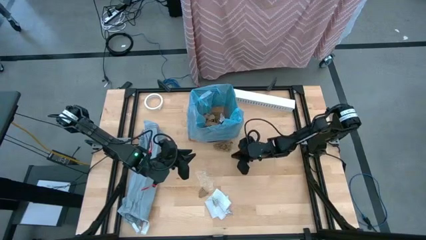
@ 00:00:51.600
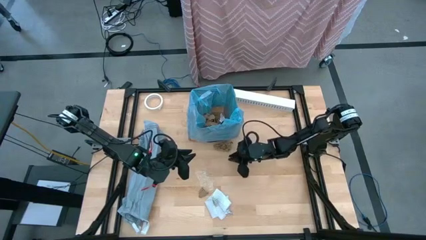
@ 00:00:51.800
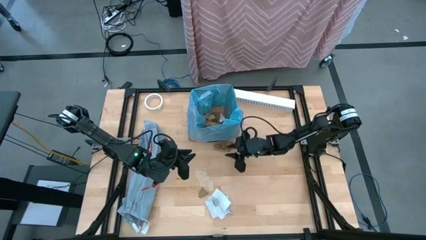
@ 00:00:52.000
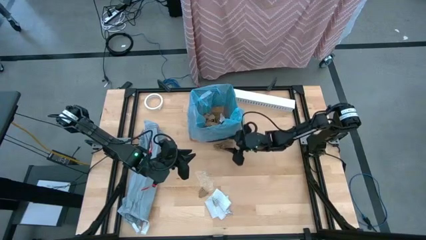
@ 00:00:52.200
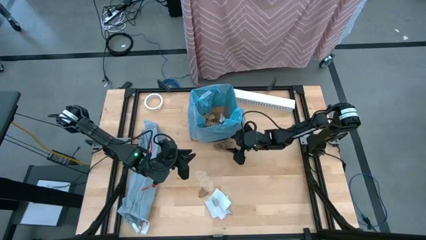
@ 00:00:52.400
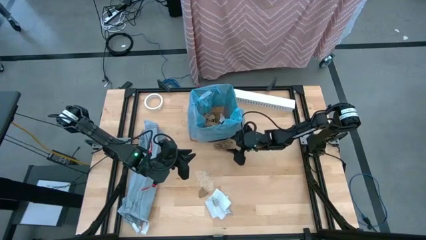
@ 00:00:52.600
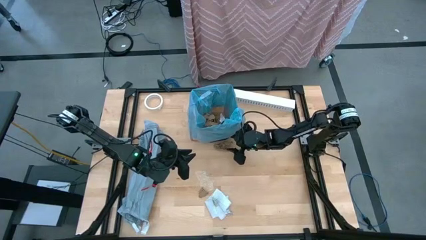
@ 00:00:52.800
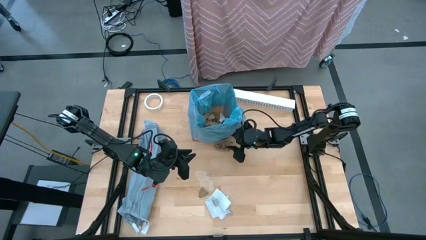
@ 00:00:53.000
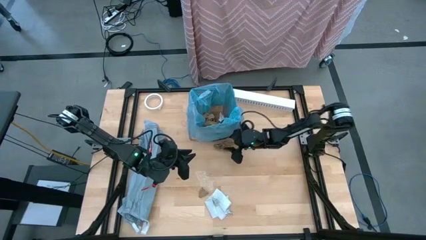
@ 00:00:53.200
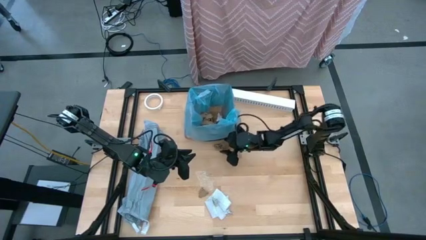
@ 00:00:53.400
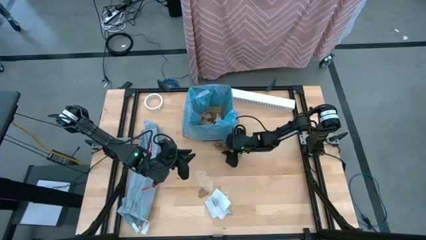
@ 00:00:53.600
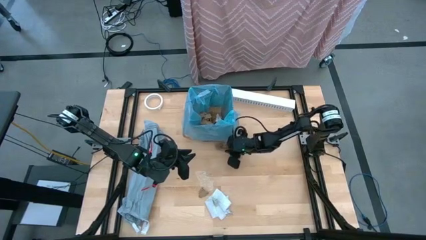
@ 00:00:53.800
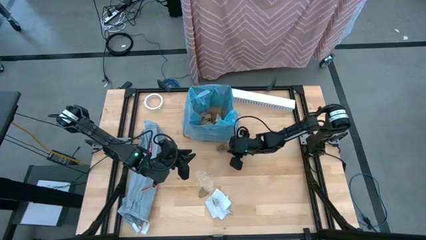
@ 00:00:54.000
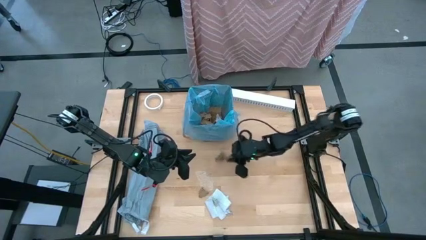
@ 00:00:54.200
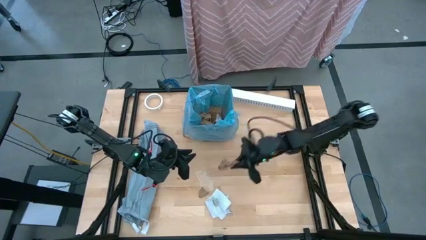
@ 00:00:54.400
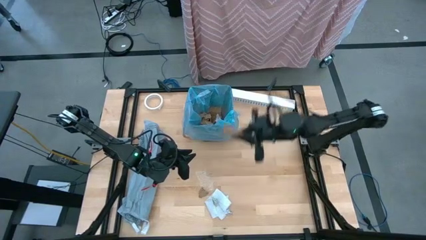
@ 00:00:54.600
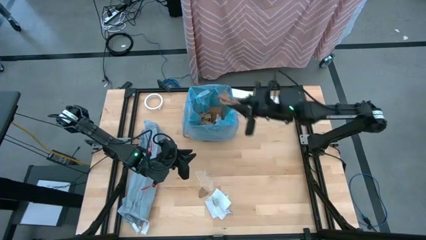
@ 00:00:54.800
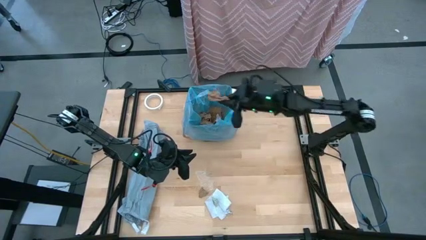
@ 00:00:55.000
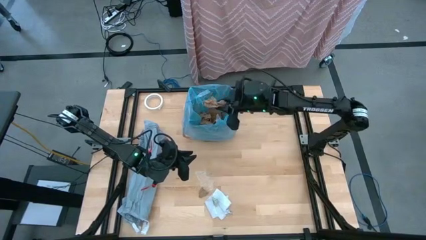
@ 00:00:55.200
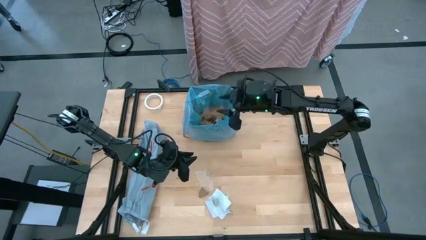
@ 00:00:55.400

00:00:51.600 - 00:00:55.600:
Task: place trash/remove bag and relplace
Put the brown napkin into the trash bin

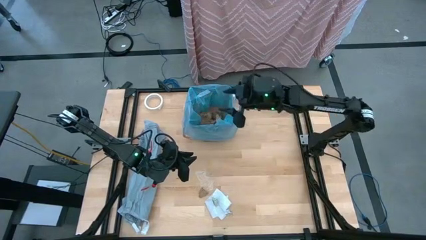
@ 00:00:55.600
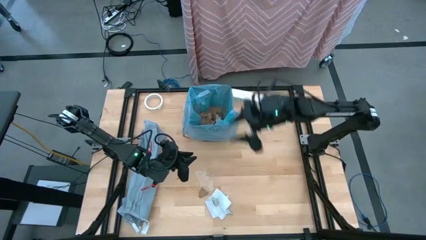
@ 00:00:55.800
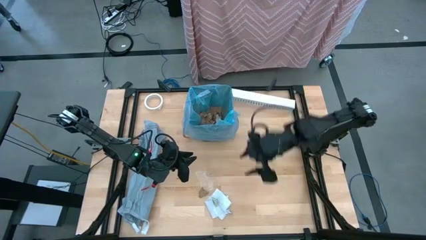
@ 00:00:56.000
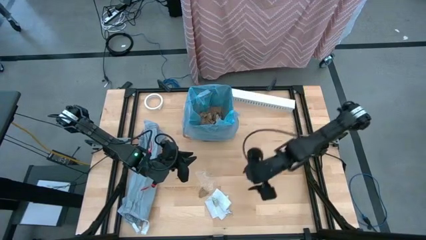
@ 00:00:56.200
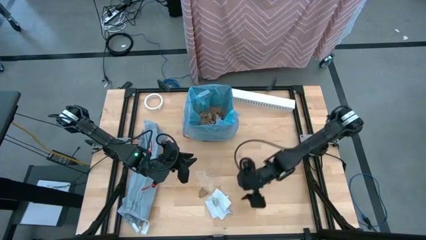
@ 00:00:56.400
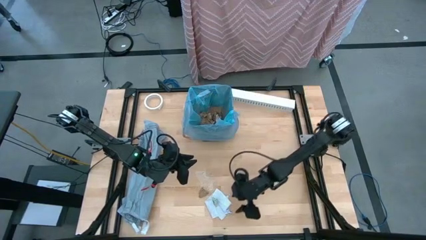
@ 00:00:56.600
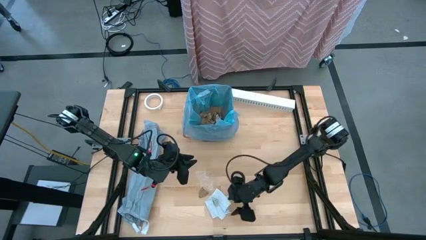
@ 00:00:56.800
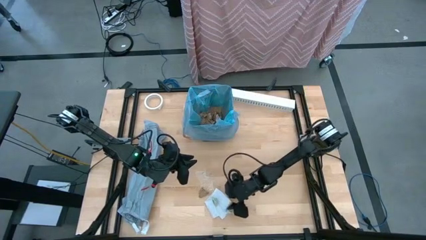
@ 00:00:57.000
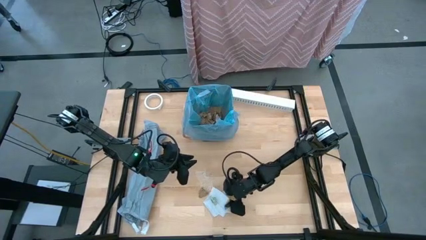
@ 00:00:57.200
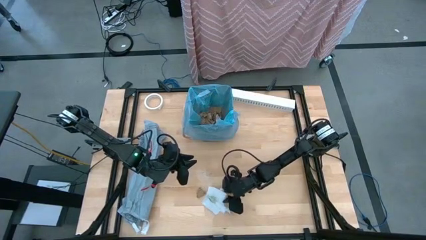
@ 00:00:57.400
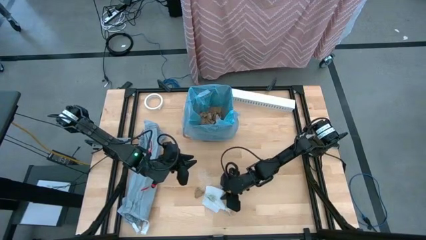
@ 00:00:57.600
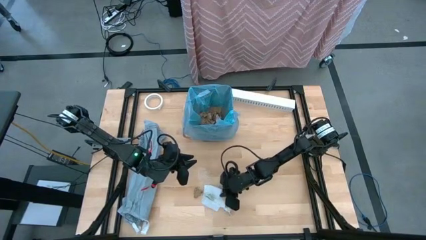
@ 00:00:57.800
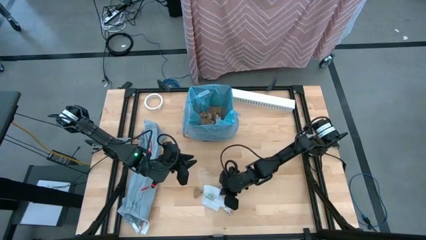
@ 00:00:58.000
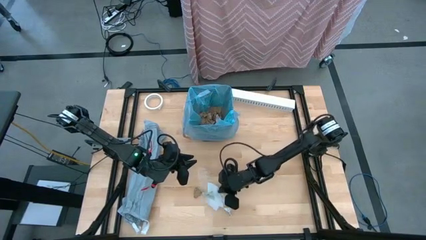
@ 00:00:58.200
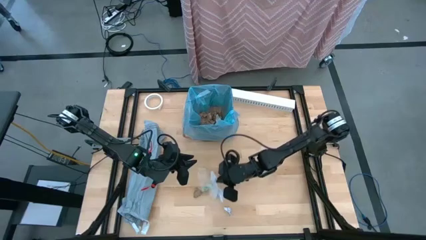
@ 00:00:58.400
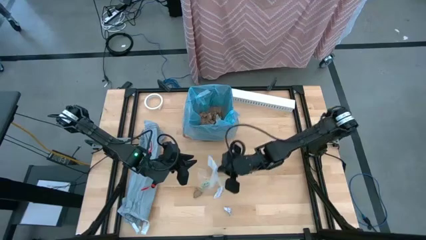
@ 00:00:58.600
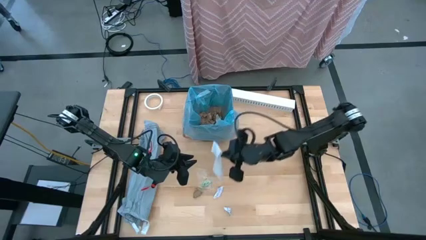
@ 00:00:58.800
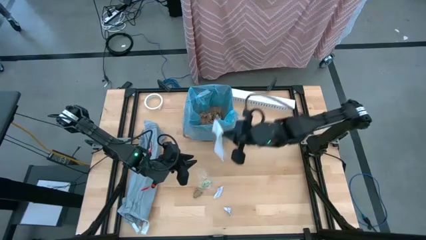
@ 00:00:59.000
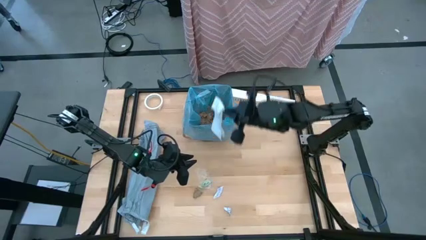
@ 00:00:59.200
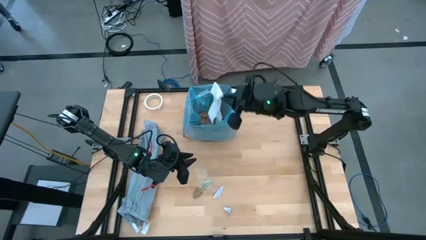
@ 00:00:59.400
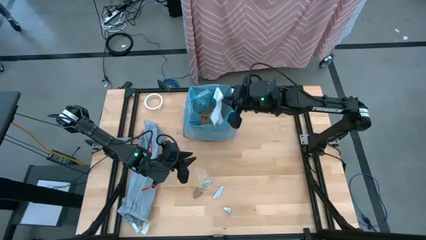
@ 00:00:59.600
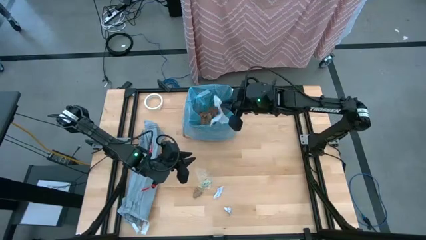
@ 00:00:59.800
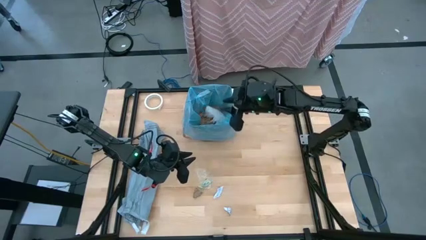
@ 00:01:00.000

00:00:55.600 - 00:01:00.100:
Put the white table napkin into the trash bin

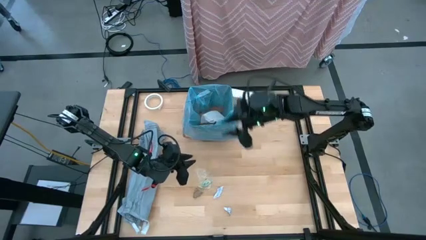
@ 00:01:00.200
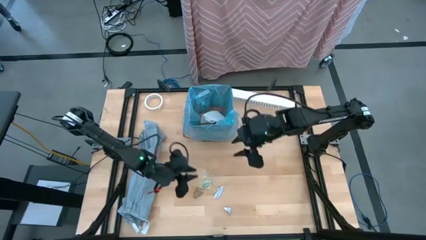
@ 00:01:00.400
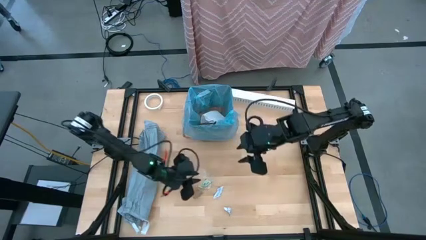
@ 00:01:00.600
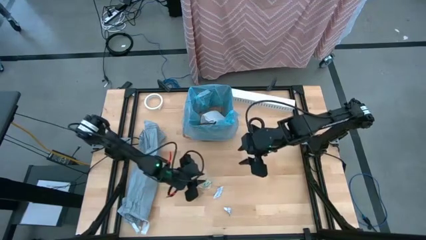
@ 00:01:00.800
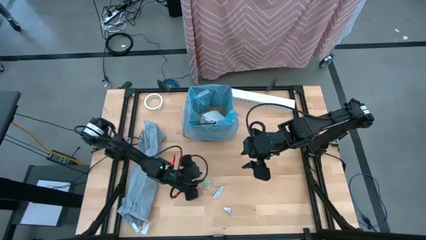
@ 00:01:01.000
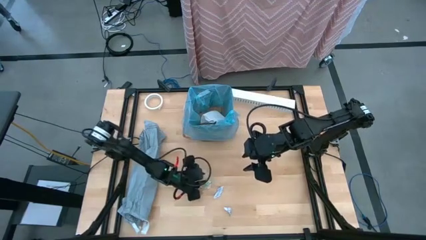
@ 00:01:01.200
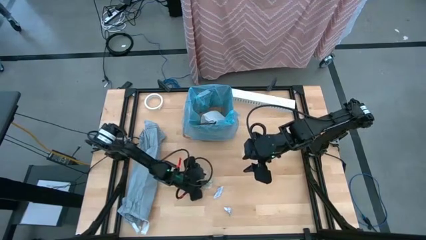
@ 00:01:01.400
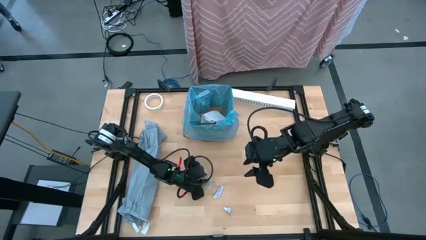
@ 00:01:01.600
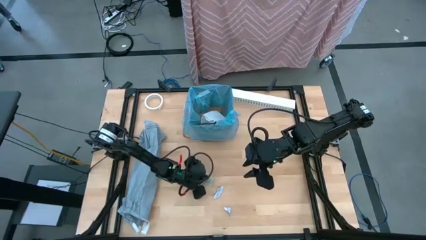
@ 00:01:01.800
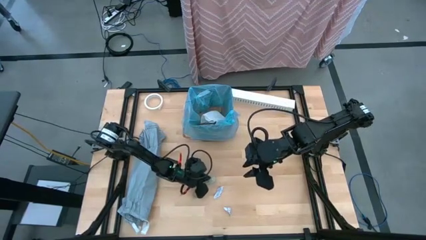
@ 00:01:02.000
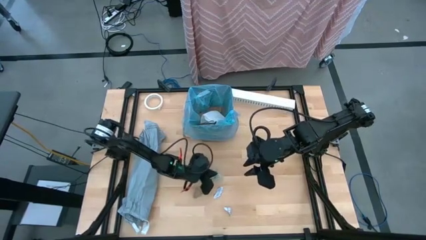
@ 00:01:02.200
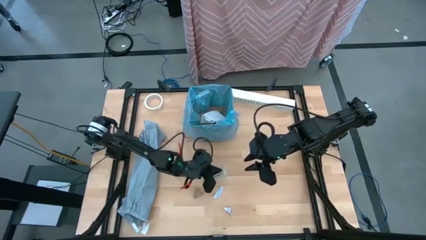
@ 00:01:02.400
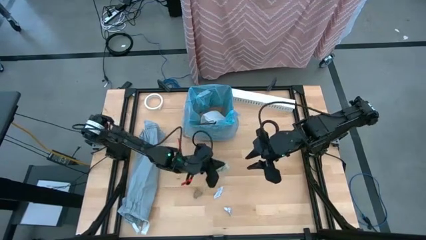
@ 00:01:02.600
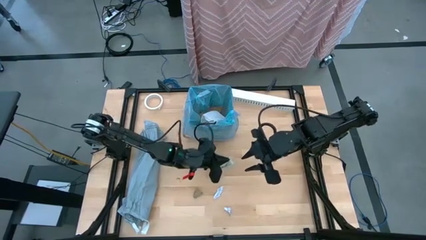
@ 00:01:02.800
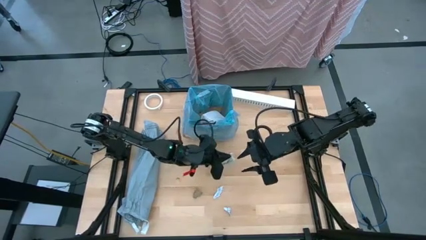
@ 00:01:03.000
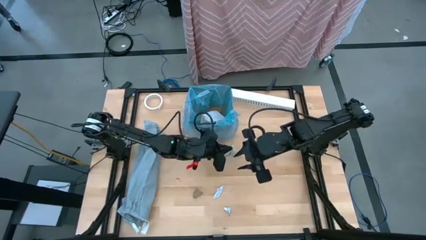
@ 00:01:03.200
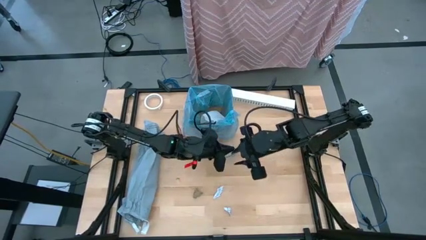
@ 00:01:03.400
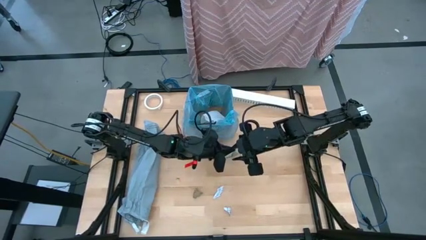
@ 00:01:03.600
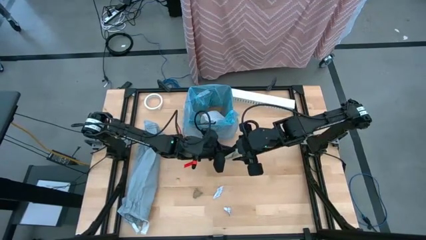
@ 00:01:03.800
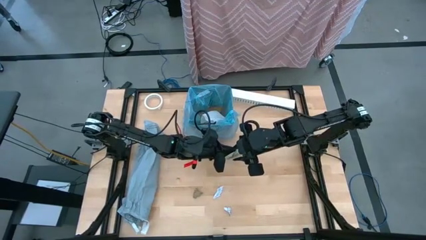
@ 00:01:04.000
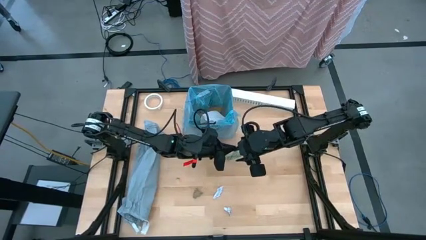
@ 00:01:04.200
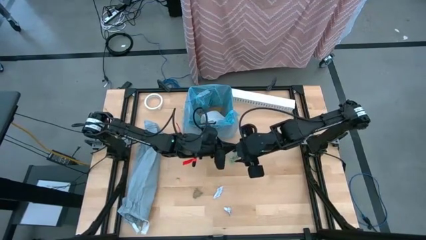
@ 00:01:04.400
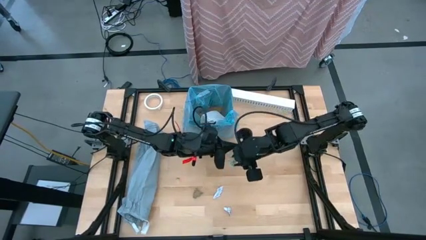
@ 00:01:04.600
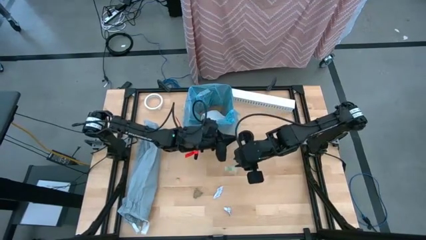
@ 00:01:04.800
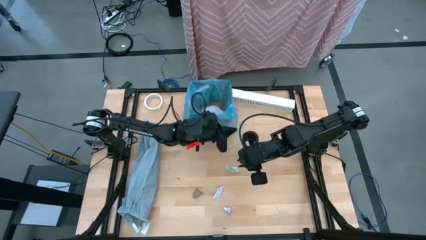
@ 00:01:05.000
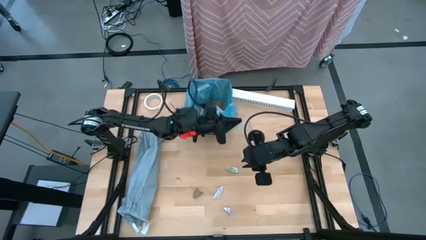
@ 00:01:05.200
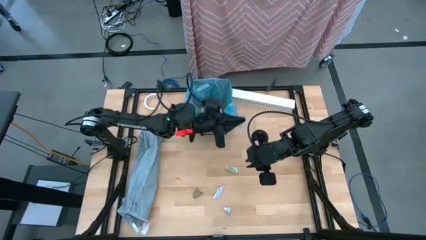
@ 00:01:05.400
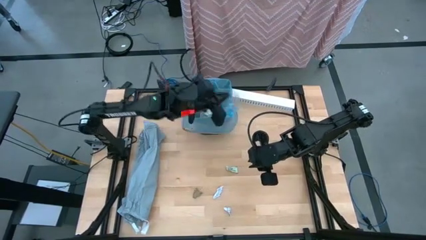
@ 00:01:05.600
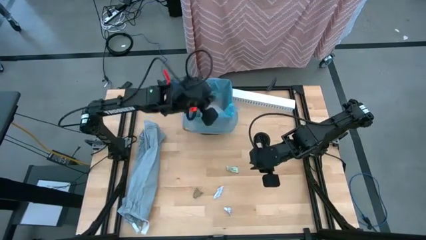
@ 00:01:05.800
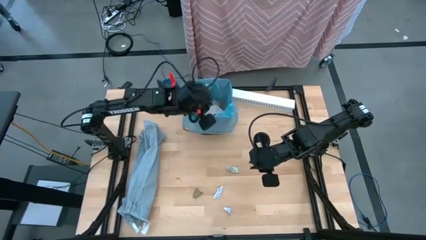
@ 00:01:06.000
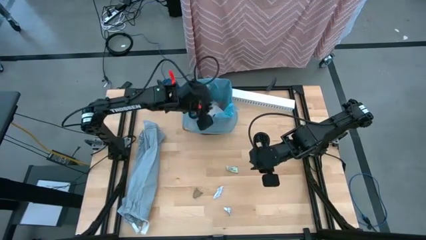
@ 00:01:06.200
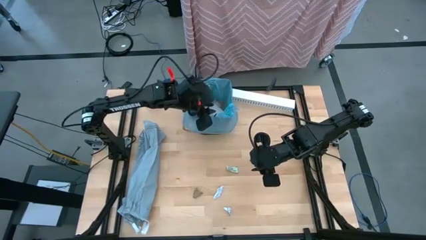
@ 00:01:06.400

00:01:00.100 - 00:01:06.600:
Put the transparent plastic into the trash bin

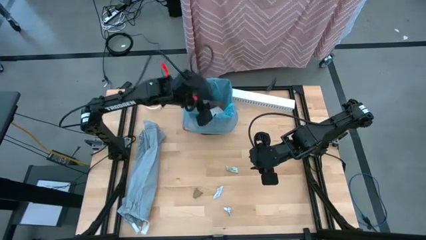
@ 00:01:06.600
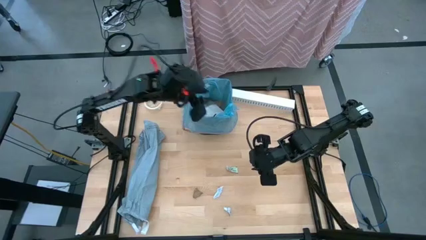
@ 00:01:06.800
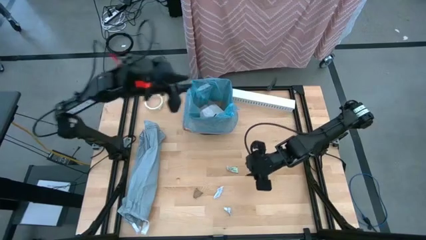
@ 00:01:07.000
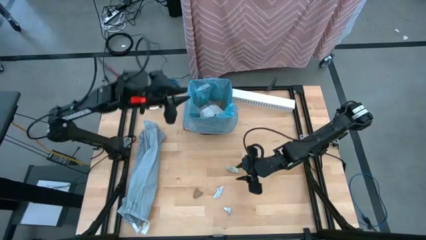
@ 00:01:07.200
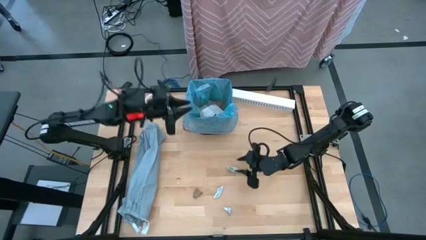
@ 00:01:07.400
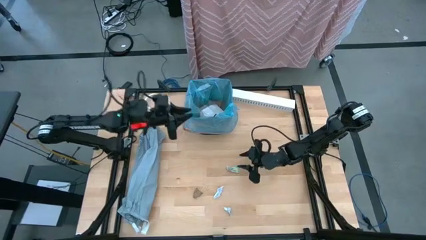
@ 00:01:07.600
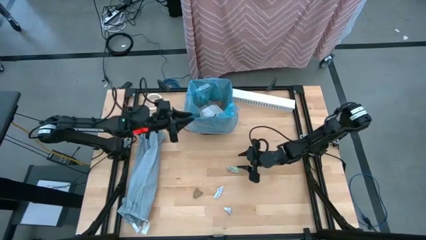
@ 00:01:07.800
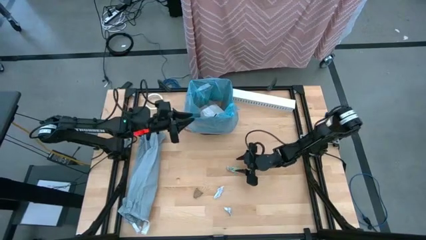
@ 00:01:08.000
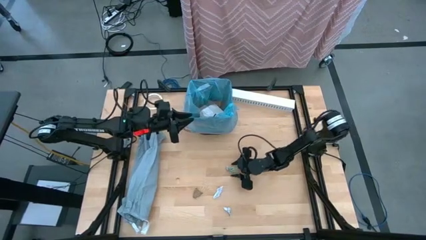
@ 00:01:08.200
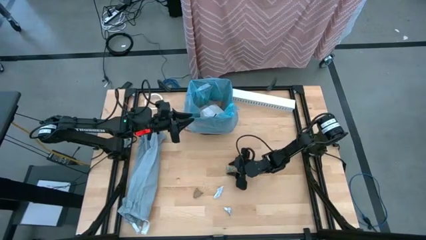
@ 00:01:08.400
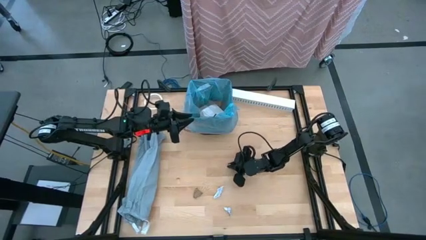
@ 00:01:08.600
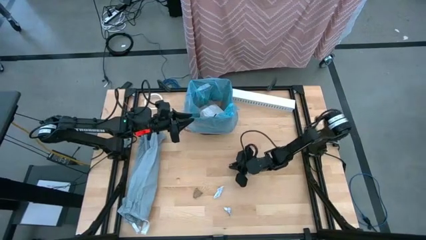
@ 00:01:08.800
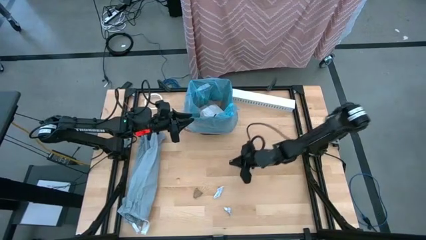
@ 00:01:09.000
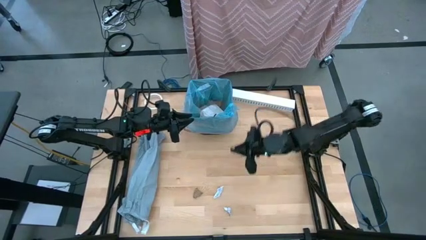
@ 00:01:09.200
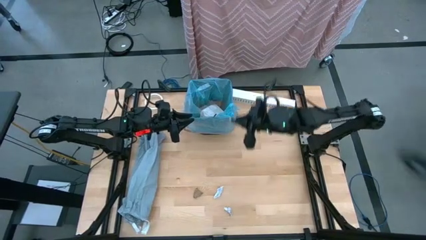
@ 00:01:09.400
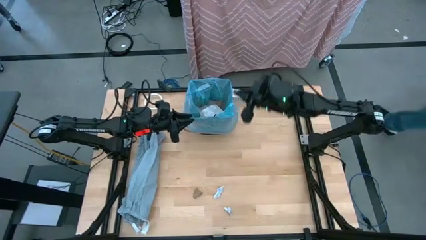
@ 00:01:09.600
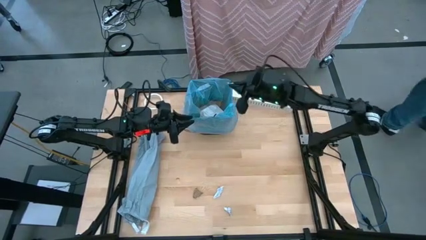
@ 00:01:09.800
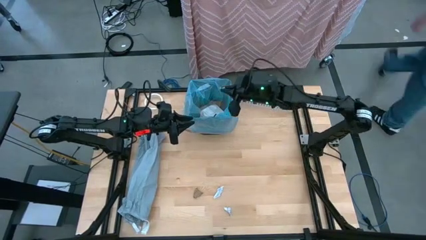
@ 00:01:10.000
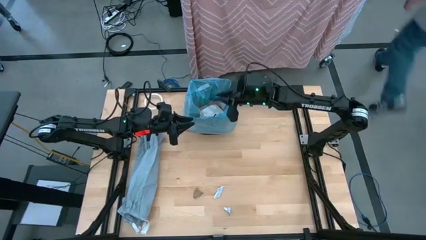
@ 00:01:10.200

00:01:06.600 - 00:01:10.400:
Put the green plastic sachet into the trash bin
